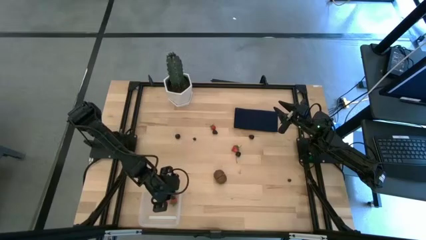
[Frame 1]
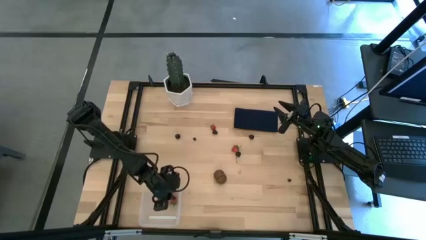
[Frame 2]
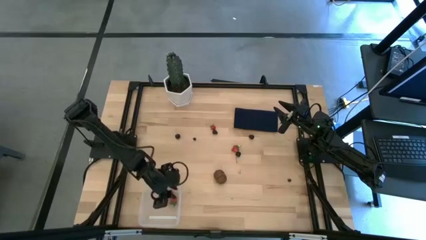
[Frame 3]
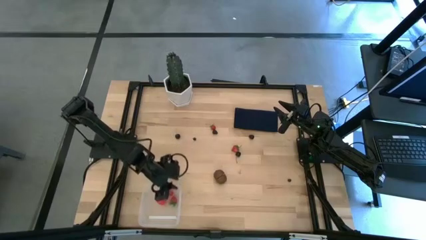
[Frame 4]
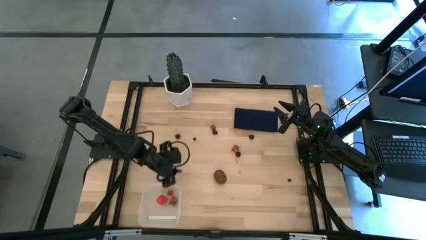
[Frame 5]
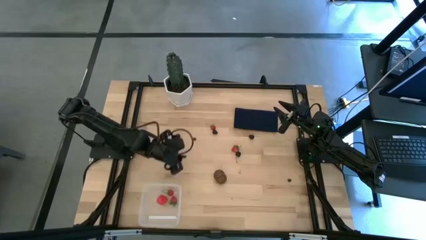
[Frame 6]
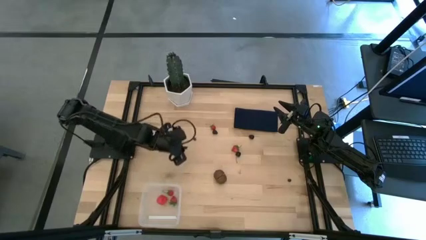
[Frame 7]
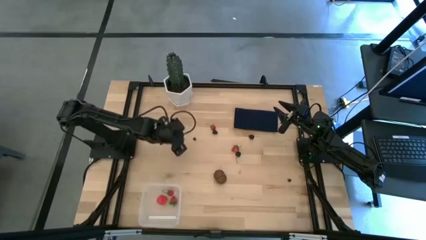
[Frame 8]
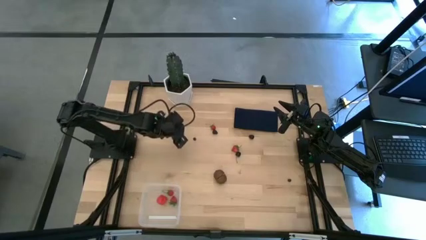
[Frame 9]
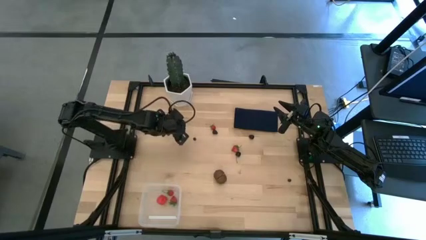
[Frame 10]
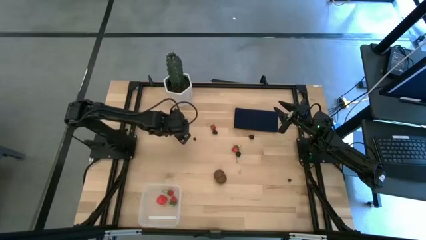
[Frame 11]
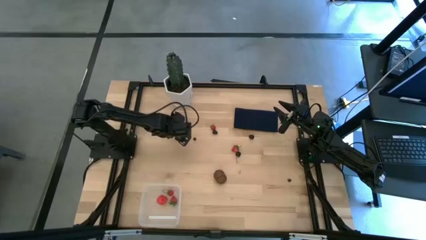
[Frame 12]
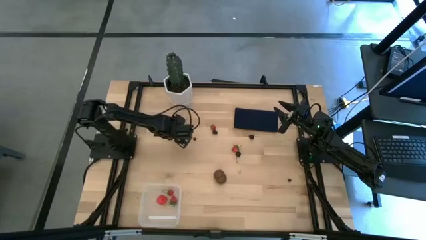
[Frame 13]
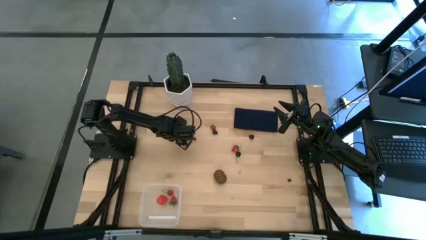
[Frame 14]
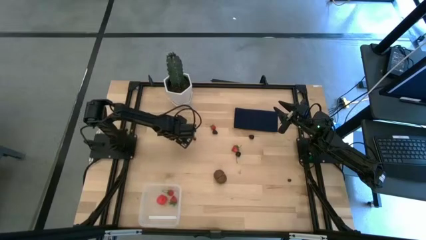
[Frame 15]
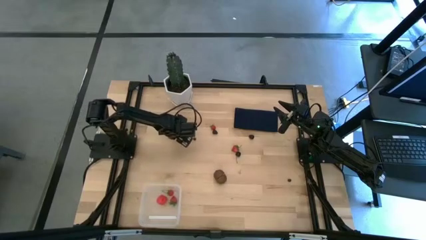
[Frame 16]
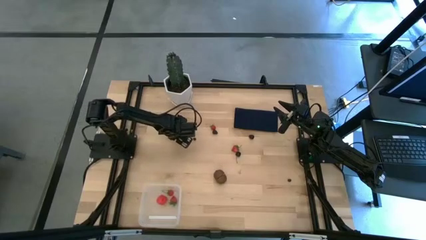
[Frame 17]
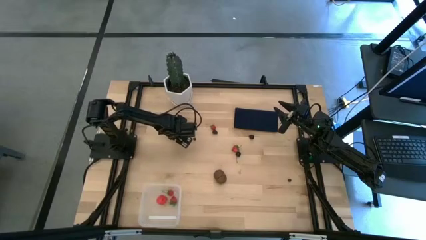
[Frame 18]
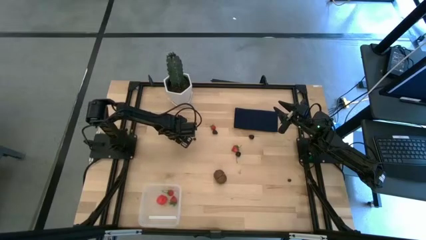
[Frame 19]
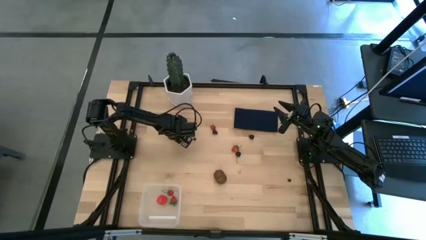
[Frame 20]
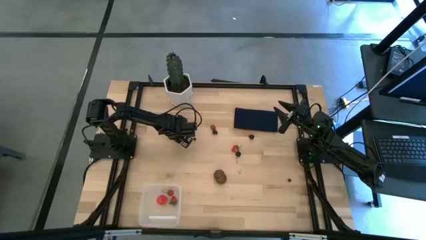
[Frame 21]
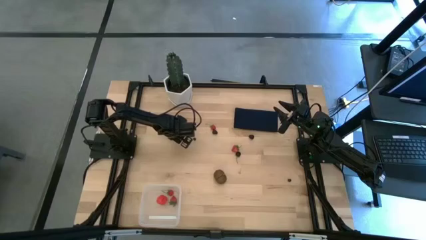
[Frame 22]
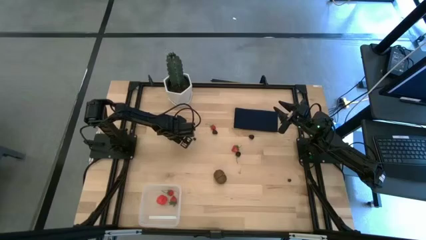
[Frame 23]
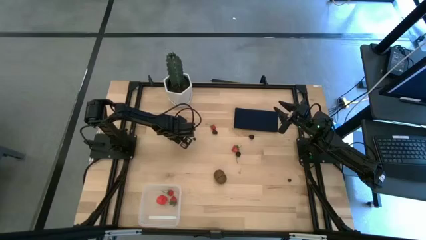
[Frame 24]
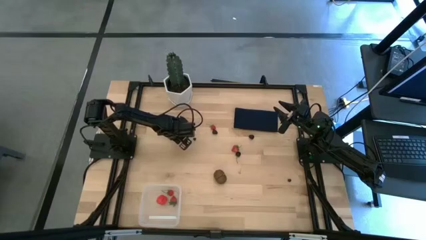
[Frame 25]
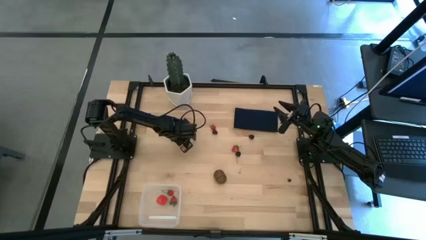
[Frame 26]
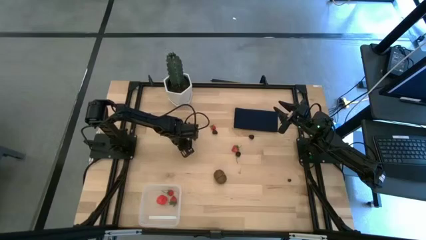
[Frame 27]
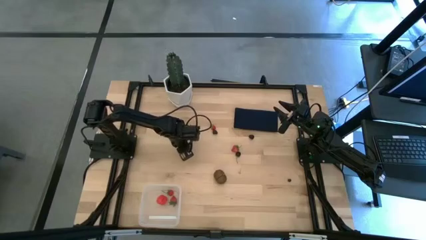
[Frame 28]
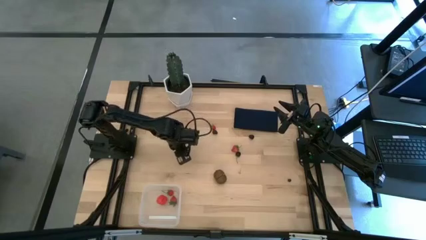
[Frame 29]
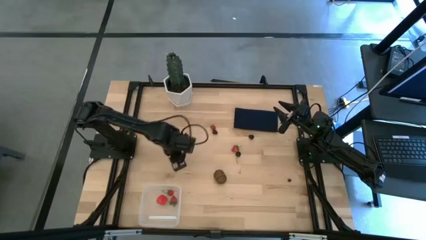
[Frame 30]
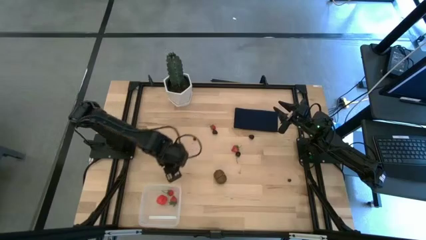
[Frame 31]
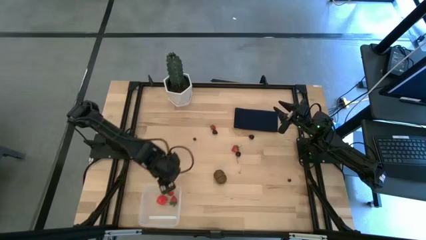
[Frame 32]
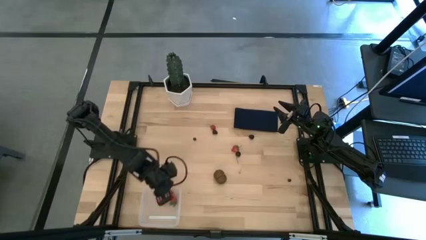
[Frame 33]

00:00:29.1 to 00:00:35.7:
Task: Pick and placing Produce into tupperware
Put the black cherry in the transparent bin

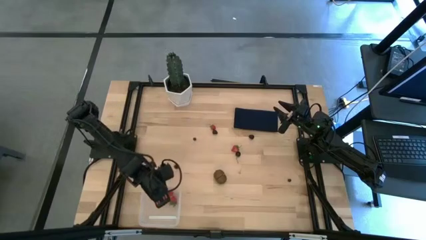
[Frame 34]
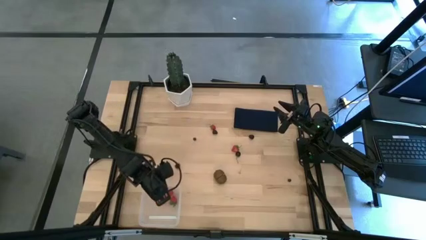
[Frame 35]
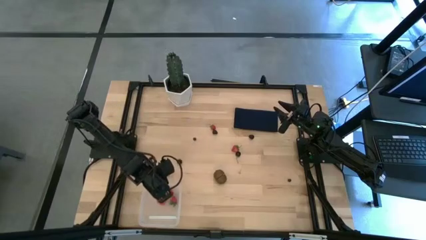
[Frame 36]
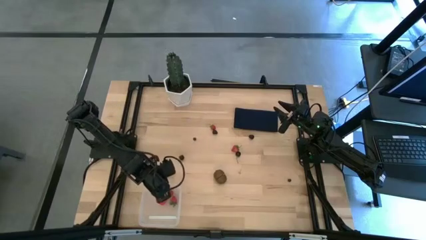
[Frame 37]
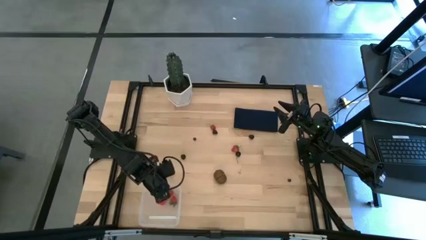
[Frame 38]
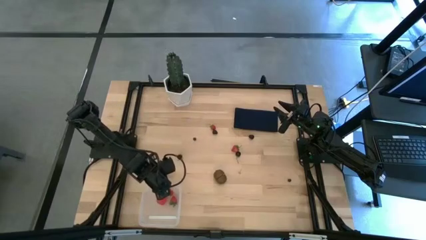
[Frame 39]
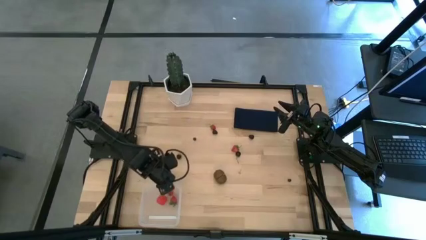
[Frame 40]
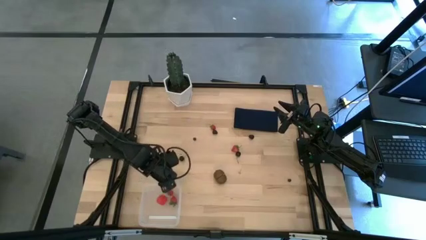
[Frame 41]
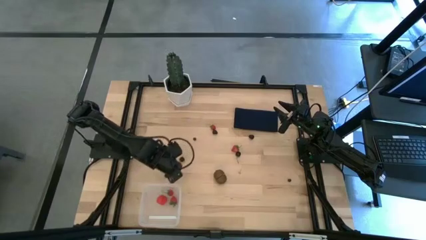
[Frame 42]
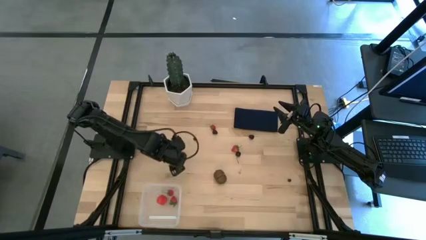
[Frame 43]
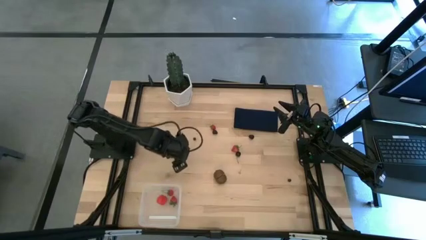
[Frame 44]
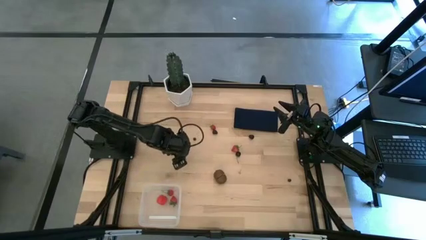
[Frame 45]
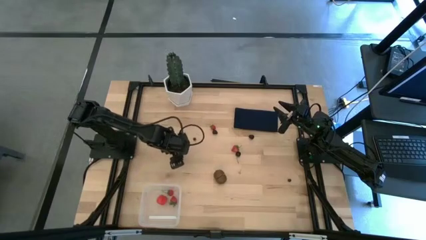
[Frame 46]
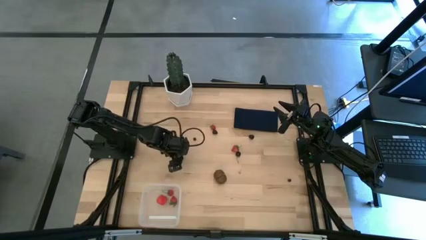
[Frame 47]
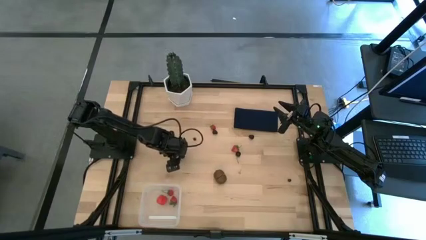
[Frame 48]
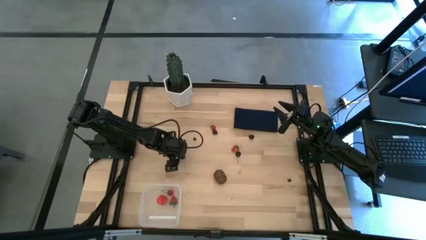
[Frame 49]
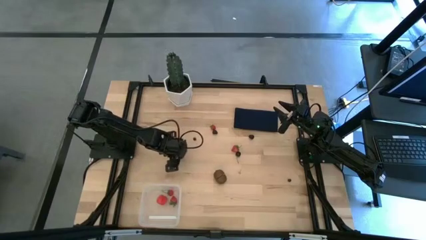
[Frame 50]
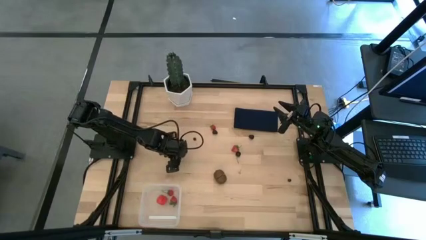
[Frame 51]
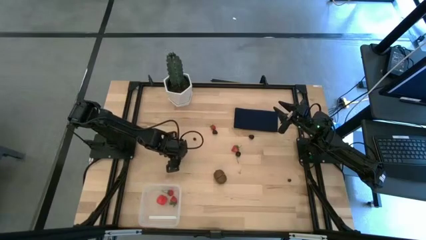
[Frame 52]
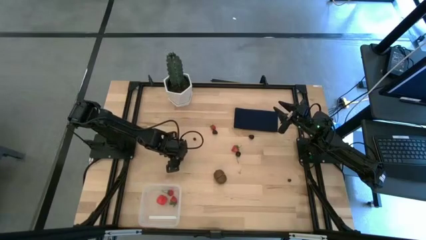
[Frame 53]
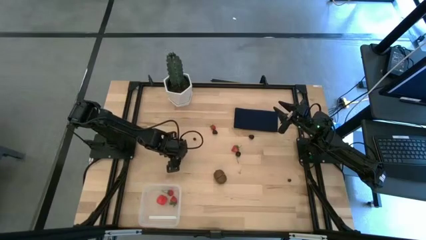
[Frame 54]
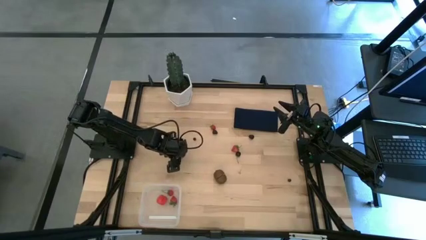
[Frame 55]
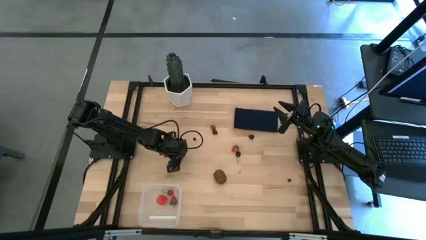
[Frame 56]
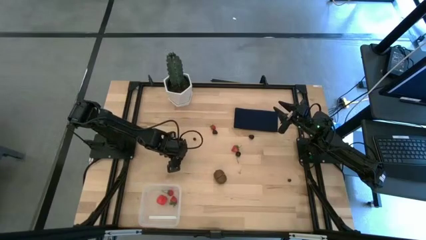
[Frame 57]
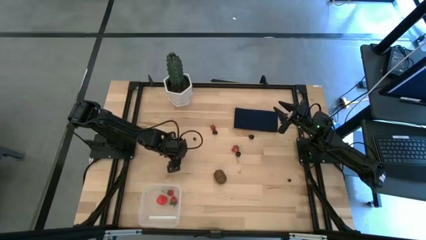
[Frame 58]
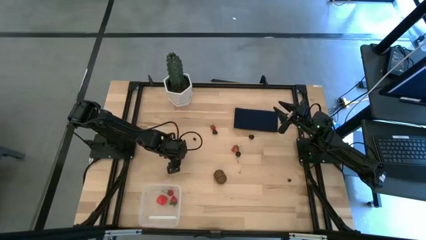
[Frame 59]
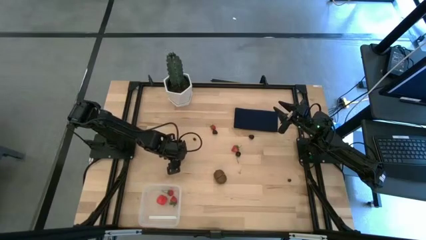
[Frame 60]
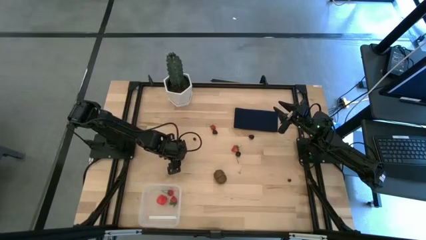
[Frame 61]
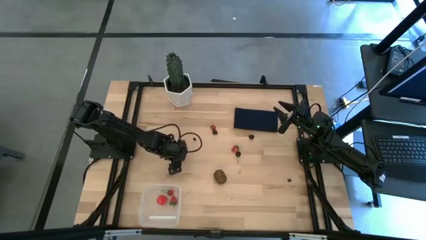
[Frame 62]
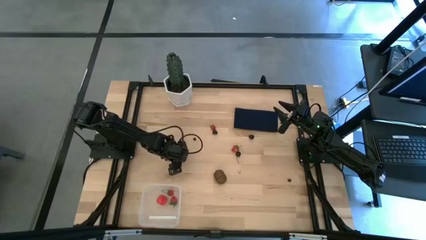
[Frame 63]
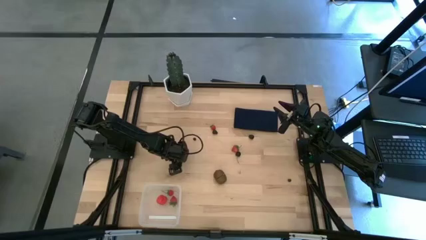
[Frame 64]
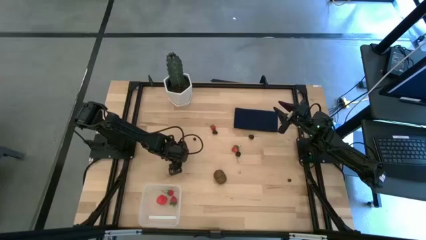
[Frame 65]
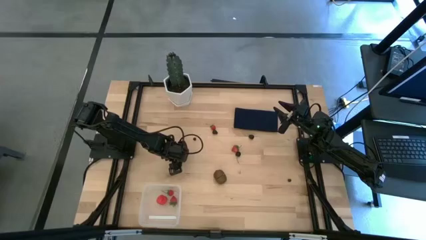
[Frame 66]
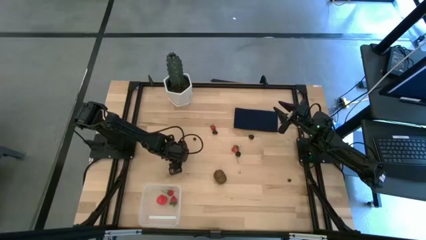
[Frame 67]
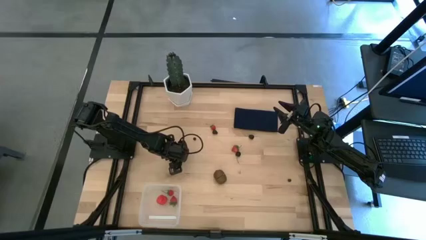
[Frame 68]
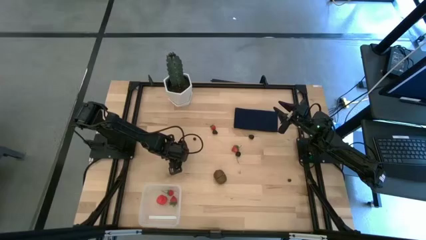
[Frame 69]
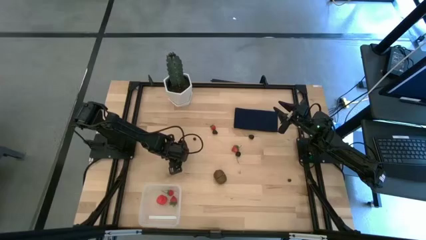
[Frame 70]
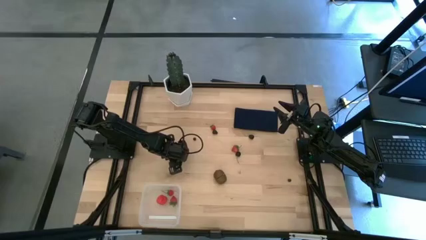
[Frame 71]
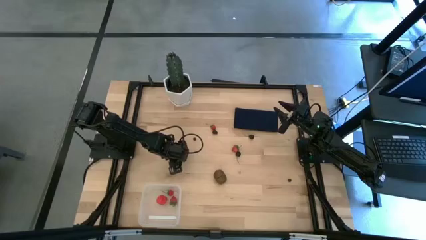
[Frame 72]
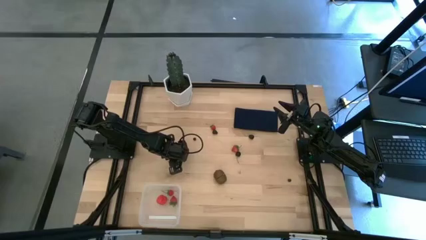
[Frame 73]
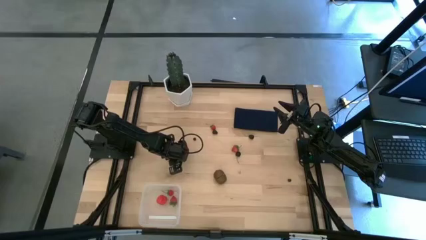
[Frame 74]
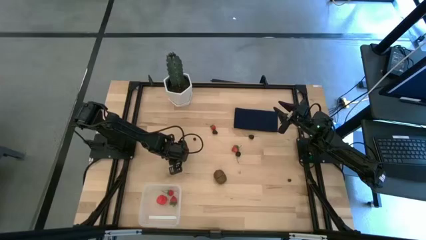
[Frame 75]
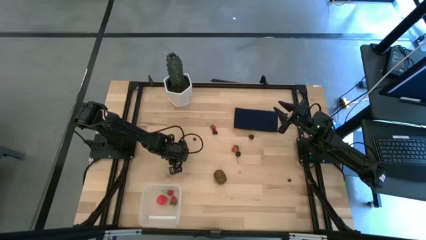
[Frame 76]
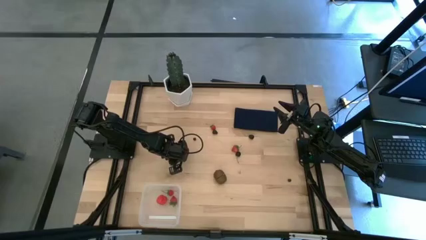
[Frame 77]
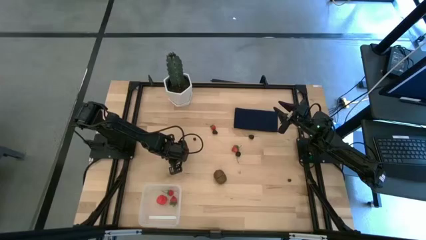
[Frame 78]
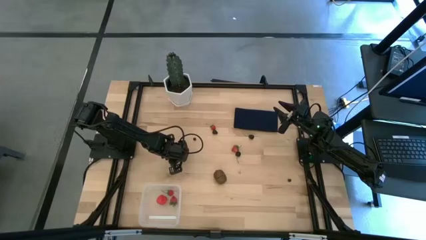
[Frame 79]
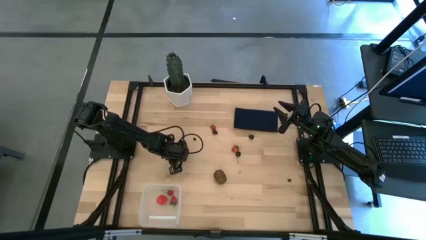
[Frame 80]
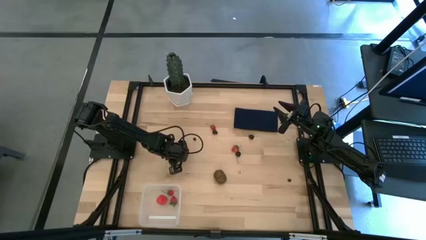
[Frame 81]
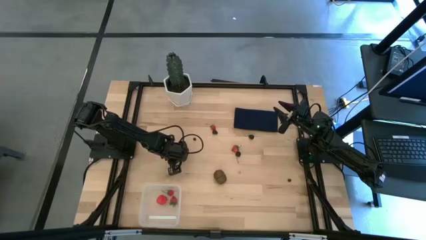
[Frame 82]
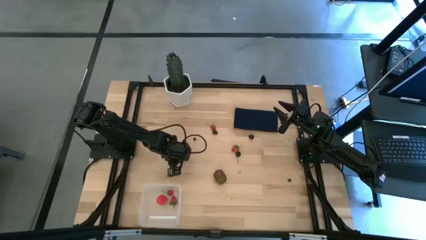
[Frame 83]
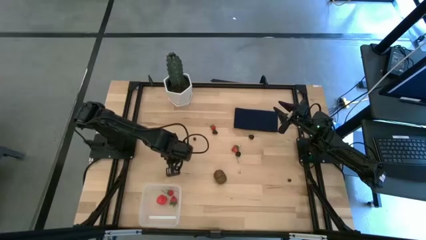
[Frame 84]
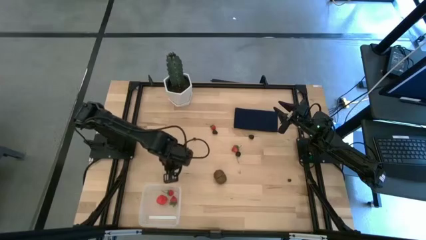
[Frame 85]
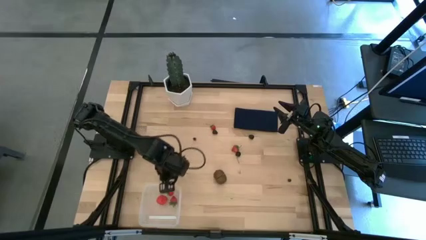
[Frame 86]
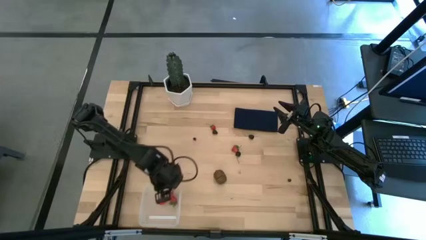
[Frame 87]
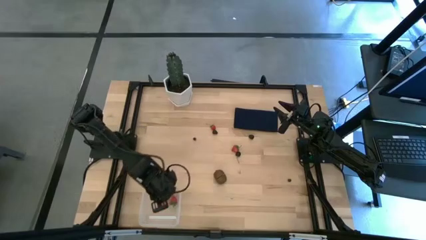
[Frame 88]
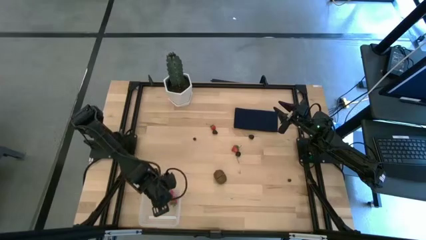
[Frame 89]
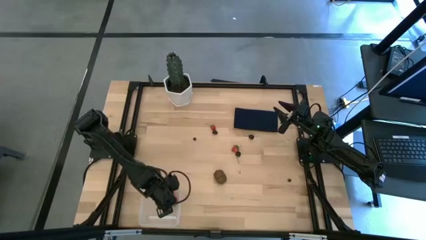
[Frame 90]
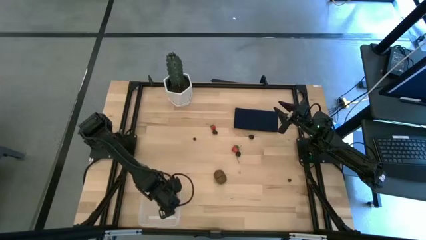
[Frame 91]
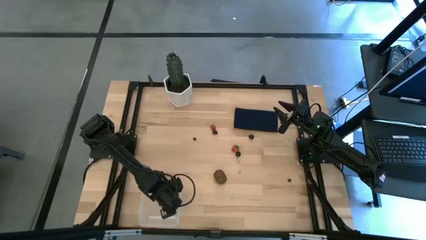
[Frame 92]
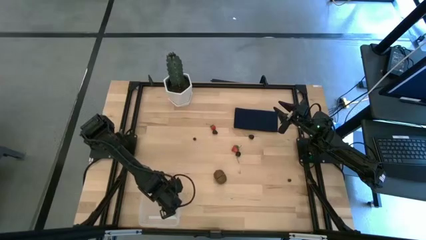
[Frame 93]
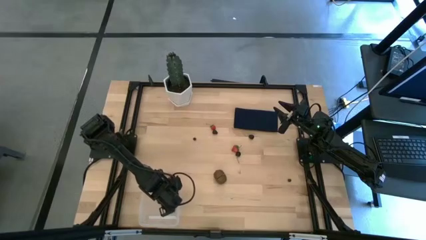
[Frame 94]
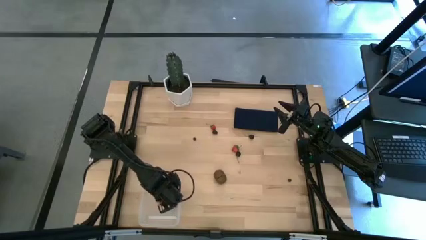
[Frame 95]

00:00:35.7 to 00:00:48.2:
Put the black cherry in the transparent bin
